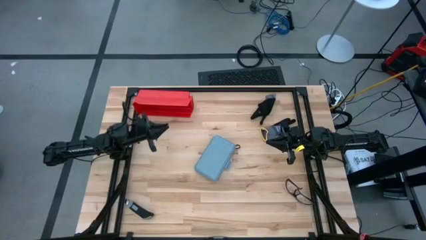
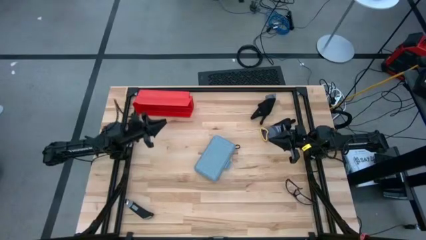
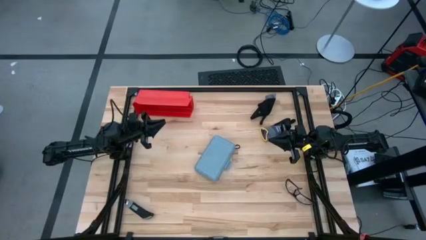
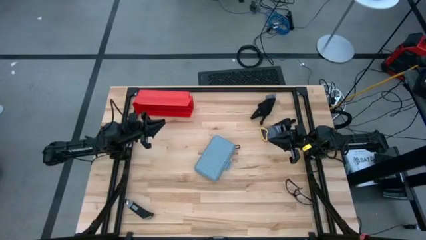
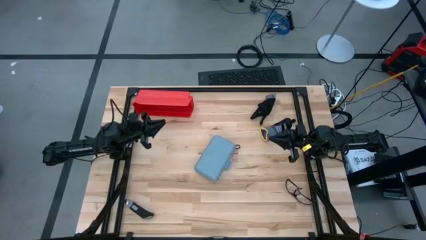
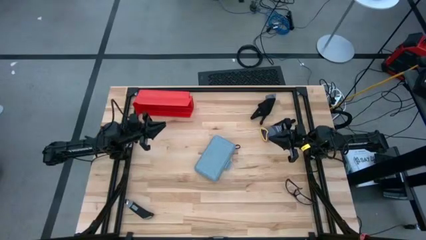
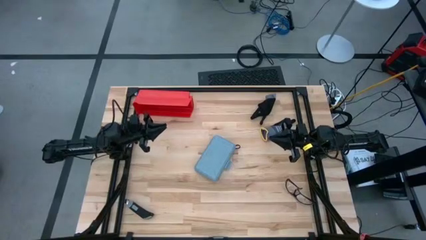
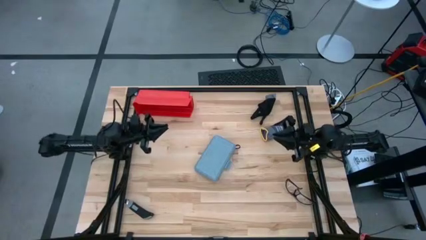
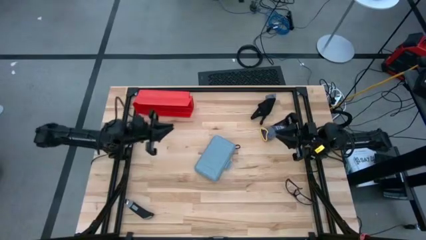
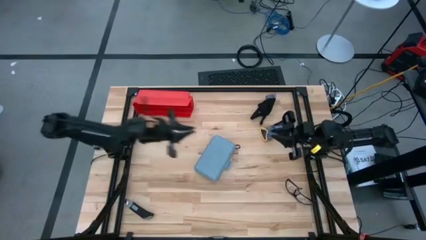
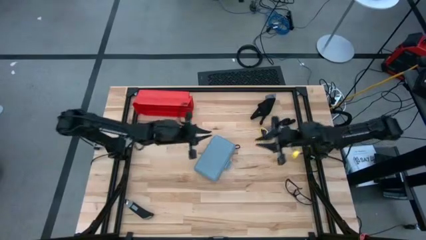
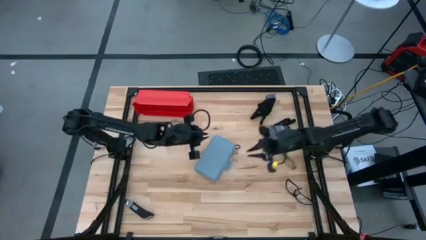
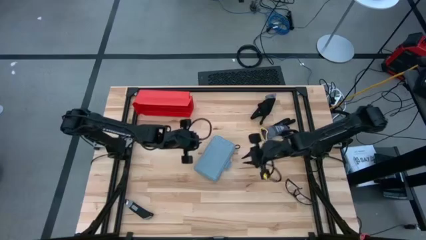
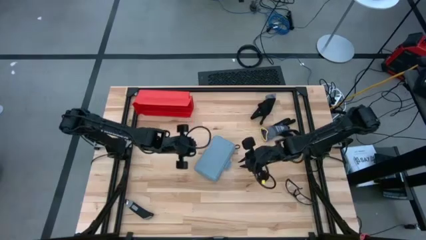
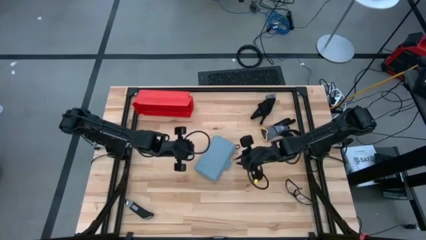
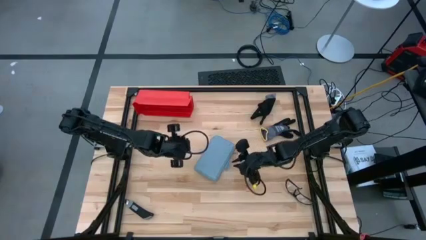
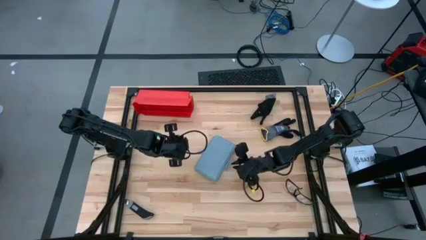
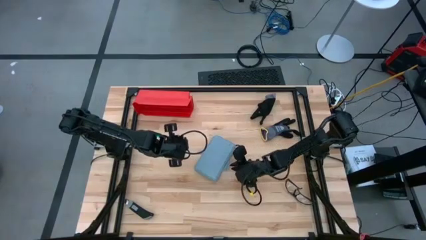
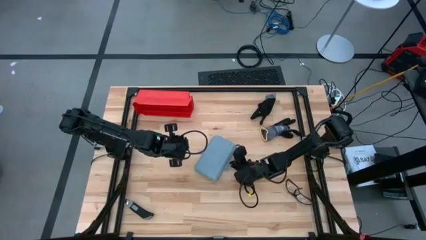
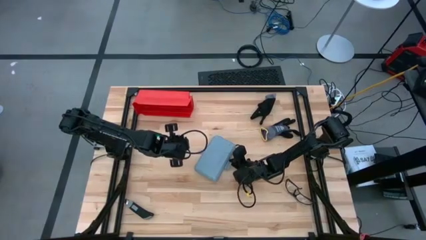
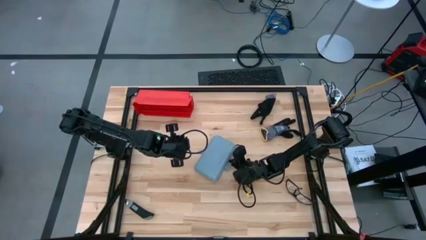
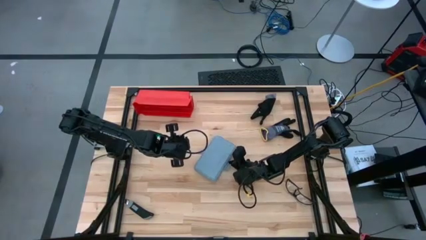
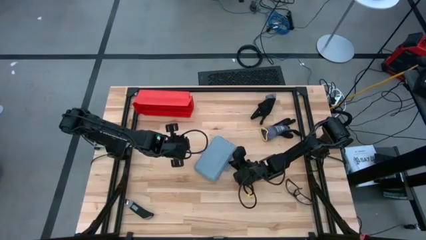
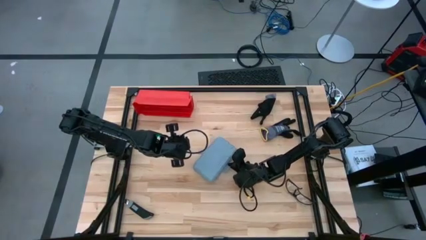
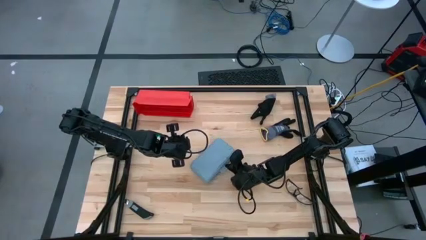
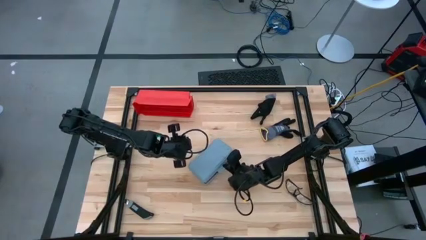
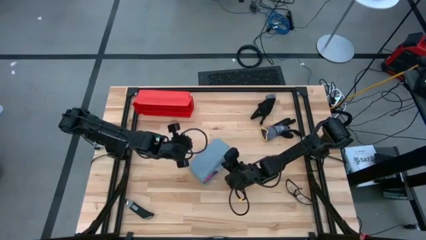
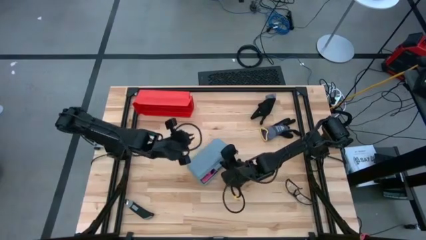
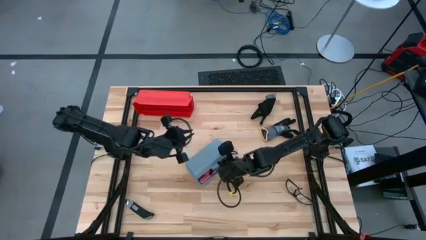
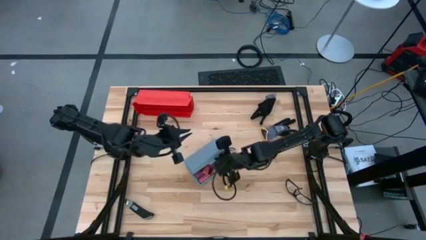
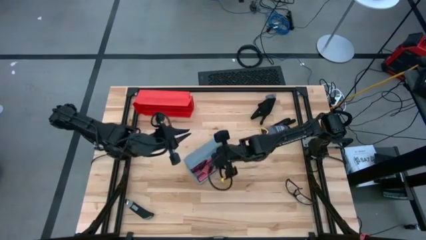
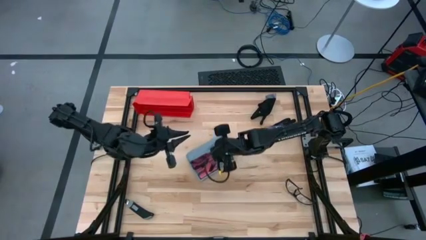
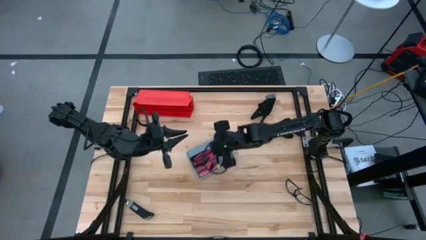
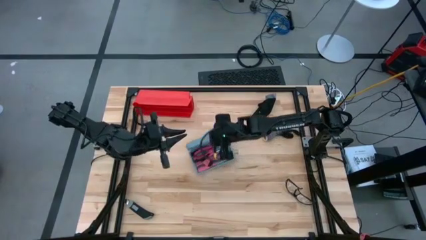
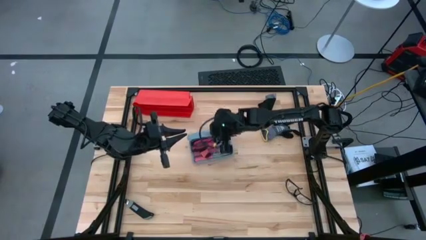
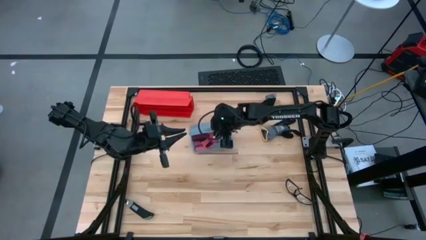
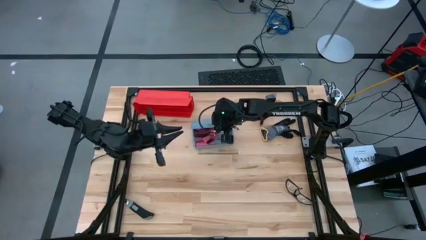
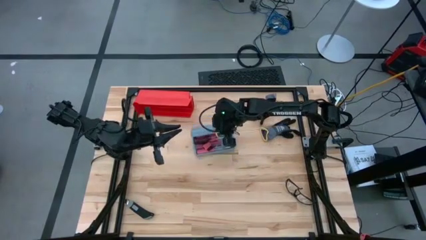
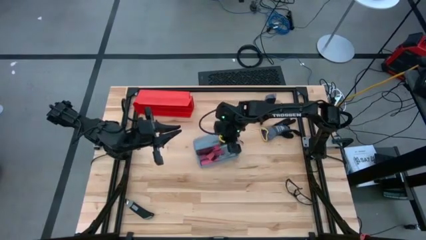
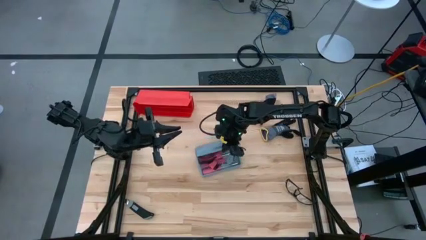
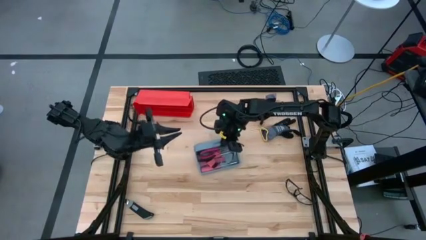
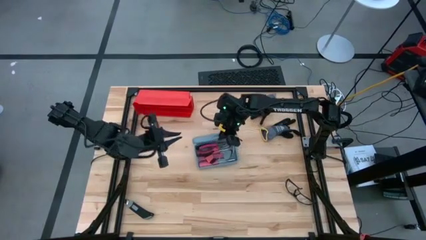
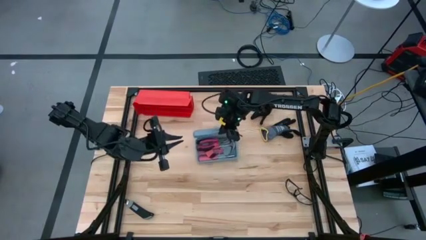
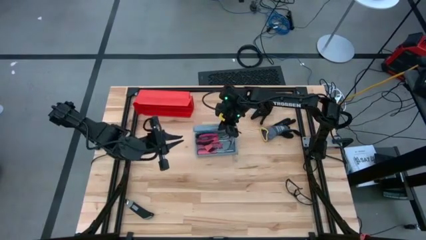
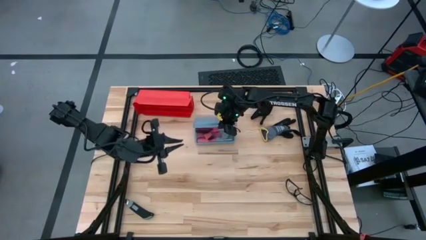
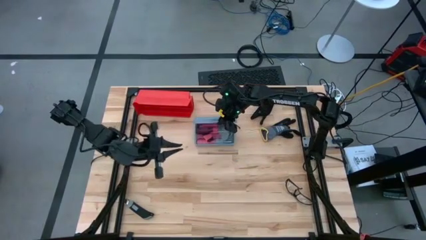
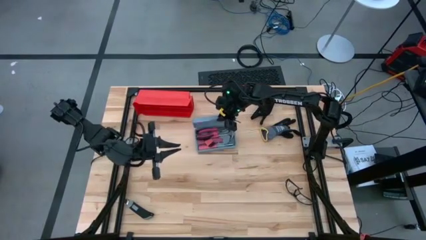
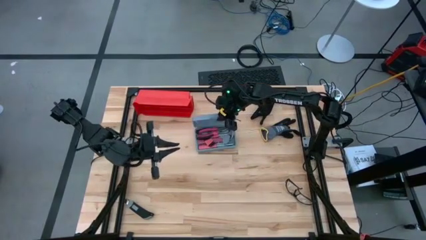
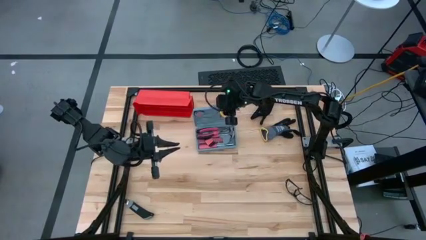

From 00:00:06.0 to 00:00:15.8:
Task: prefit tool cases
Open the gray pre-fit tool case

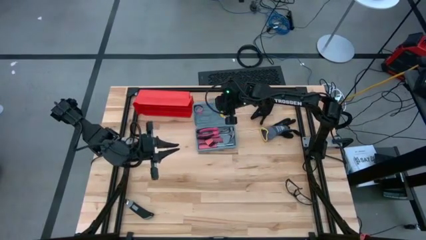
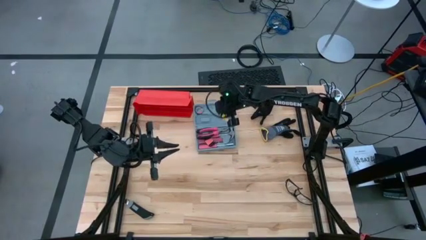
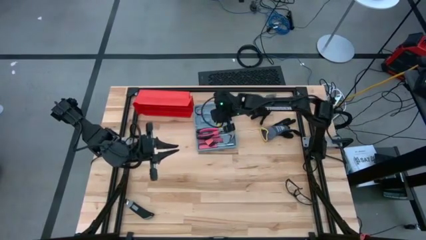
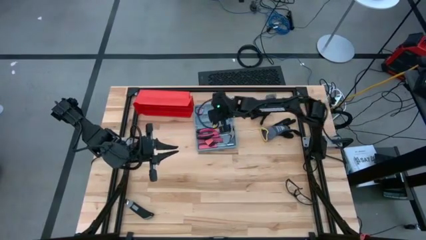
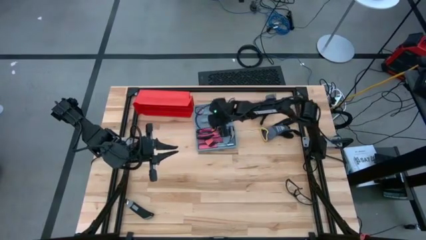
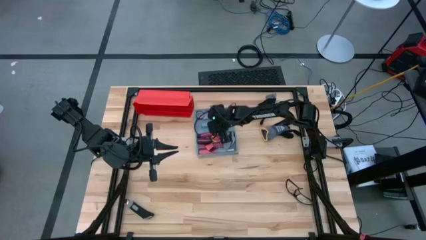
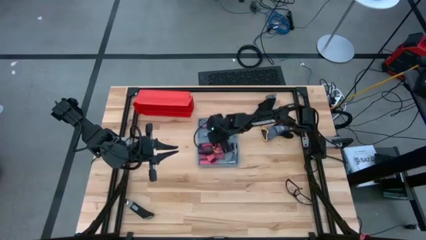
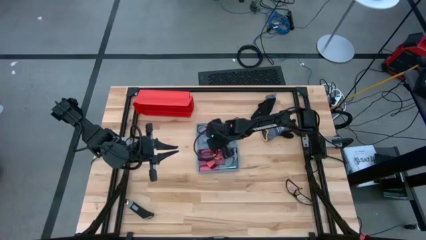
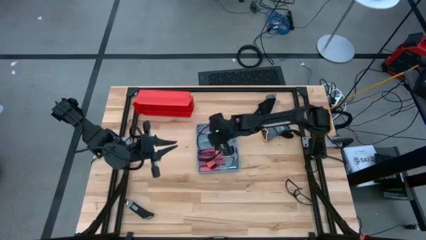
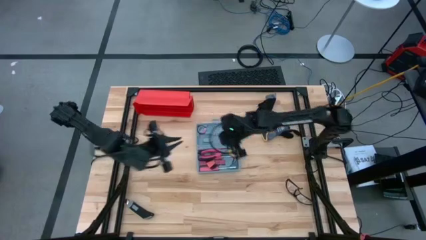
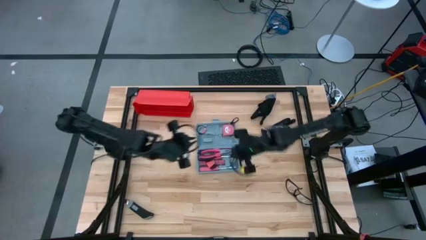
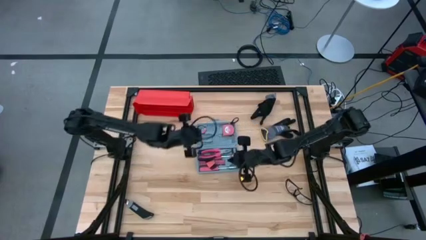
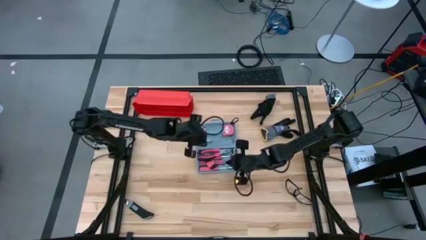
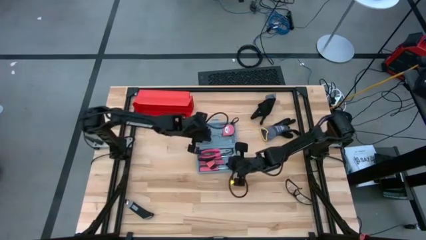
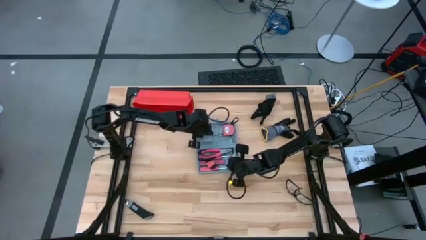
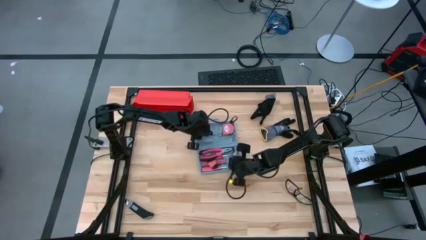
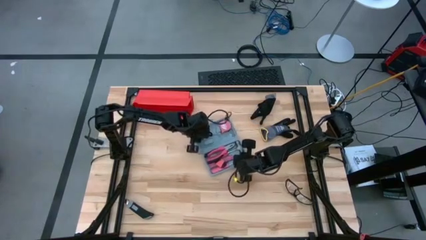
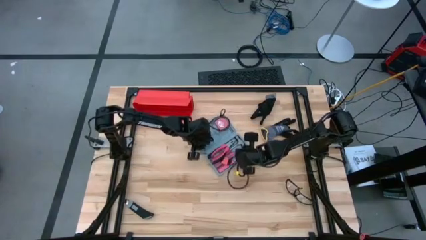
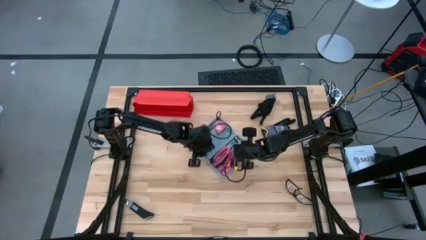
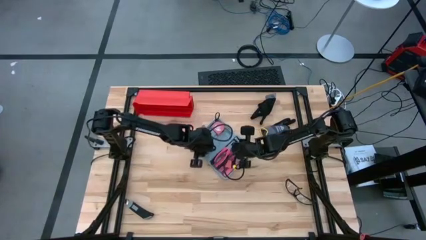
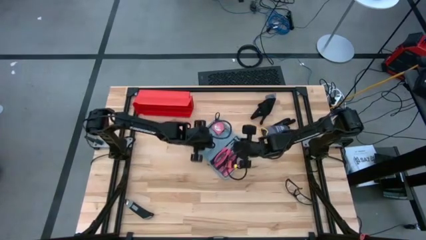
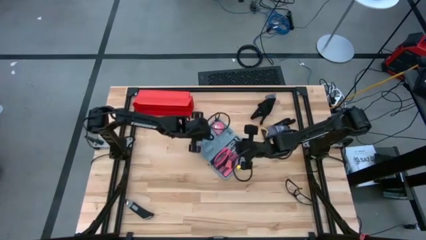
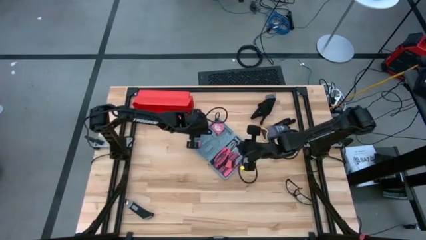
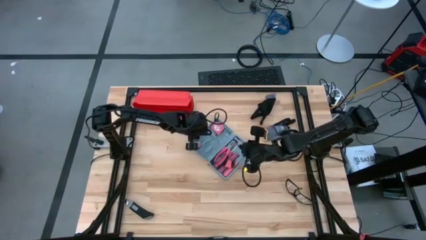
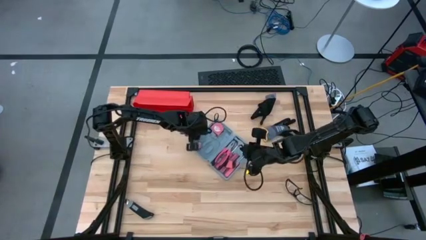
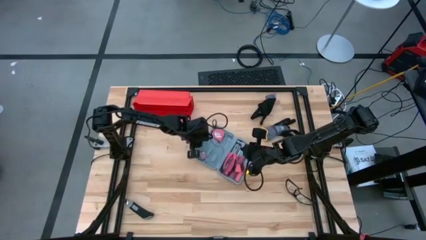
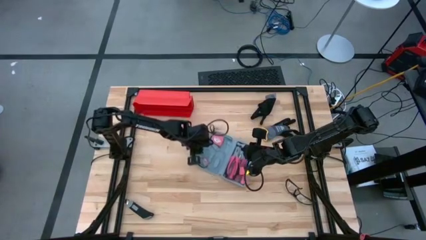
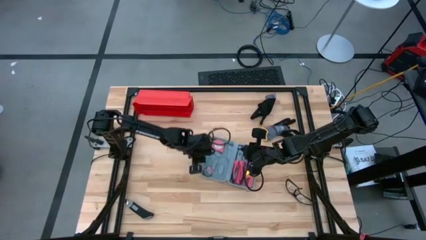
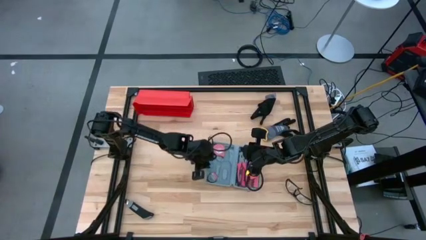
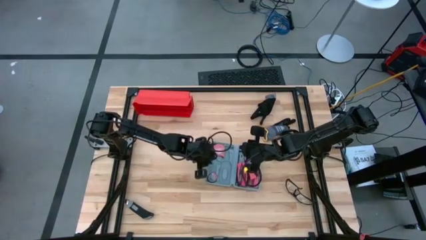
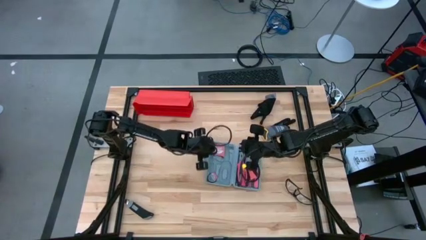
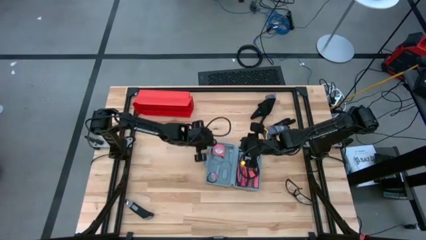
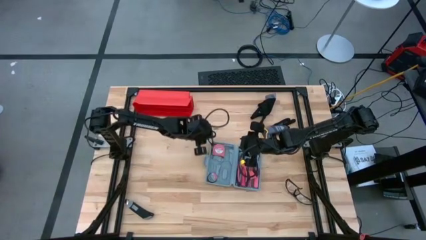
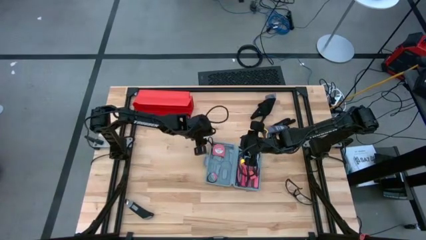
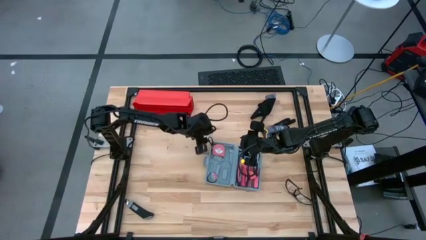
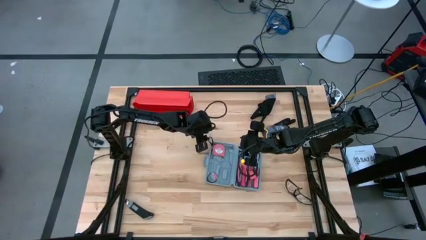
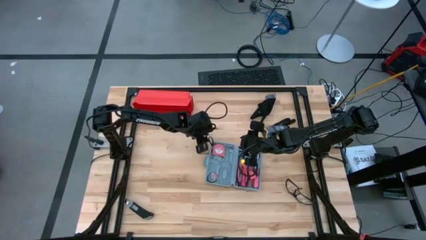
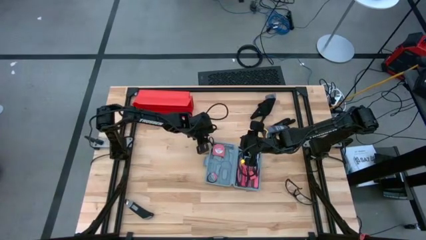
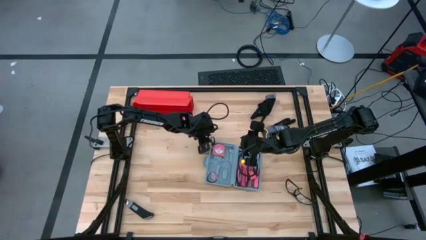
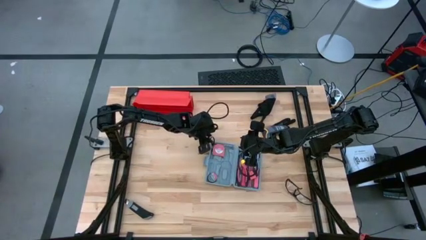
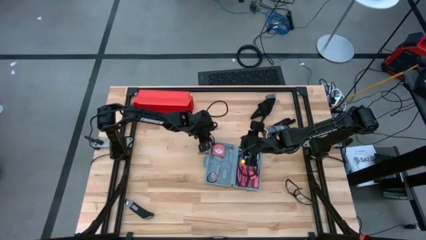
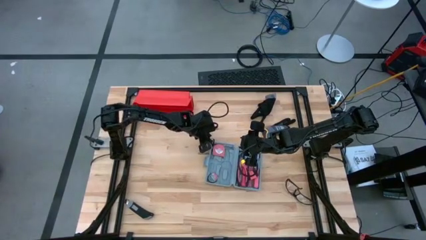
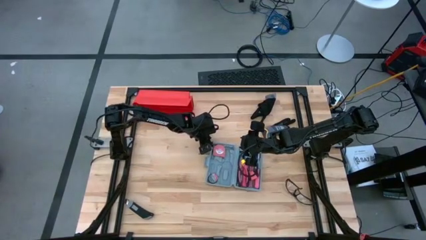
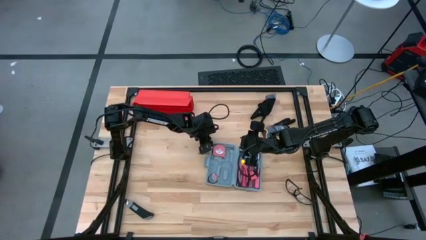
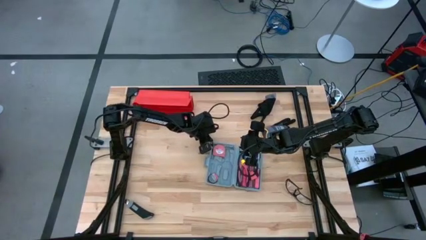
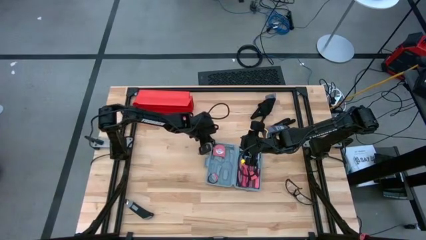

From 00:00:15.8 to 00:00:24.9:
Remove the orange measuring tape from the gray pre-fit tool case
